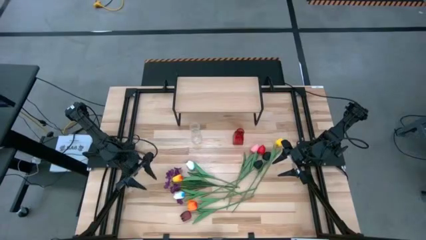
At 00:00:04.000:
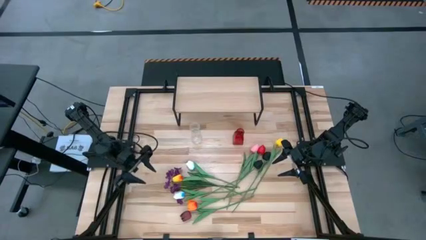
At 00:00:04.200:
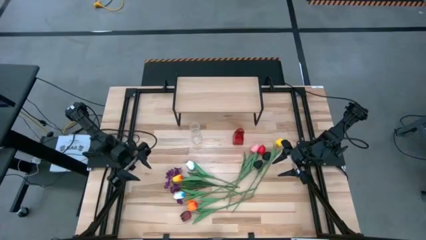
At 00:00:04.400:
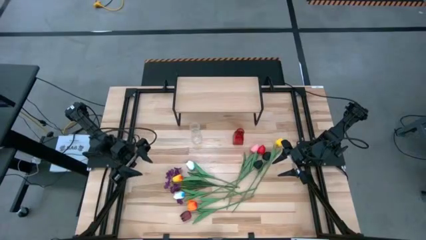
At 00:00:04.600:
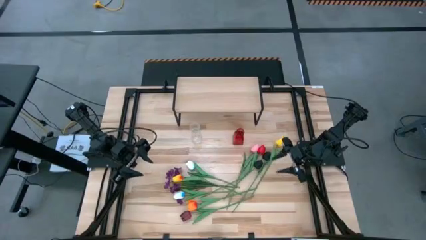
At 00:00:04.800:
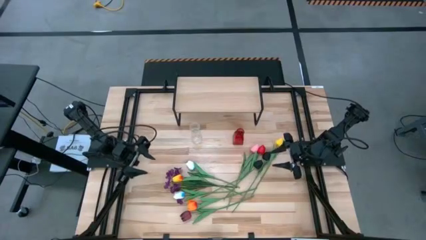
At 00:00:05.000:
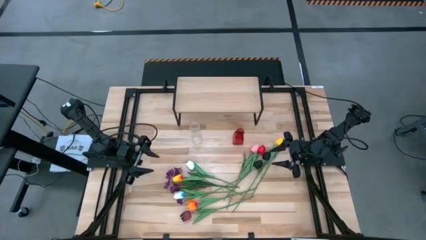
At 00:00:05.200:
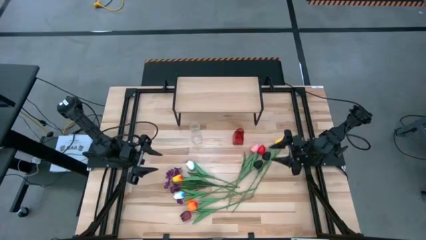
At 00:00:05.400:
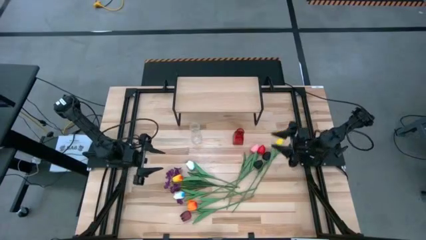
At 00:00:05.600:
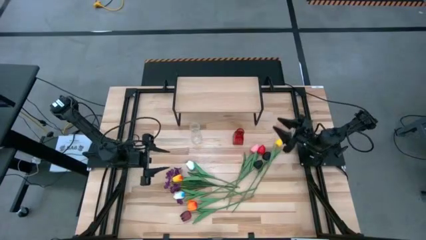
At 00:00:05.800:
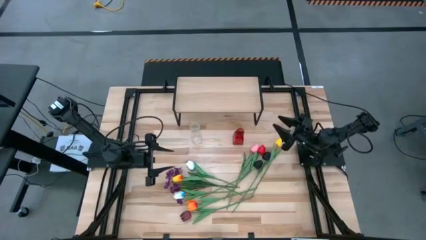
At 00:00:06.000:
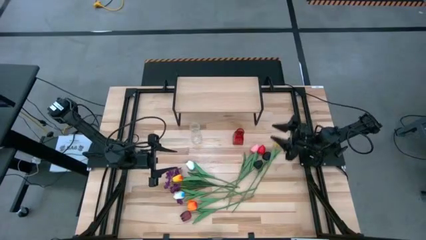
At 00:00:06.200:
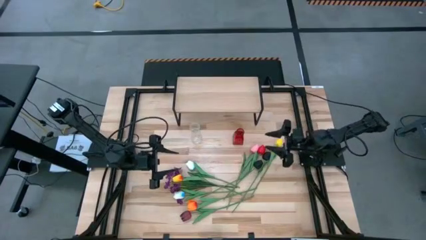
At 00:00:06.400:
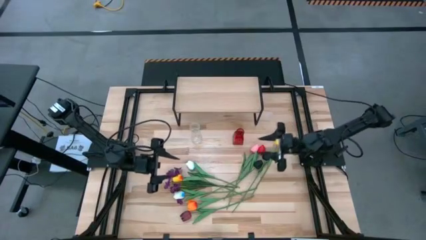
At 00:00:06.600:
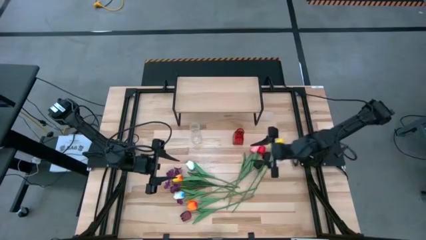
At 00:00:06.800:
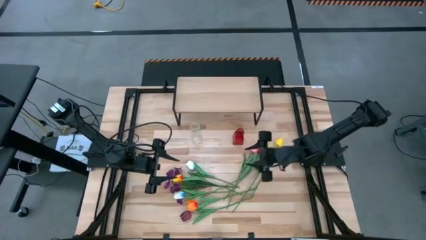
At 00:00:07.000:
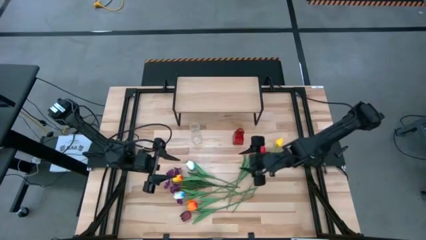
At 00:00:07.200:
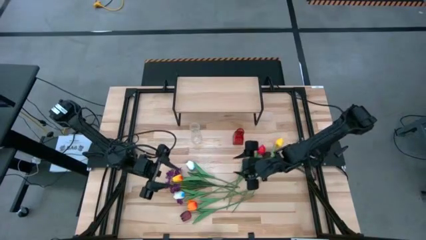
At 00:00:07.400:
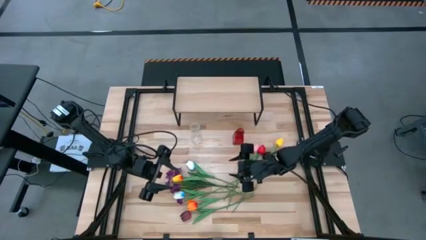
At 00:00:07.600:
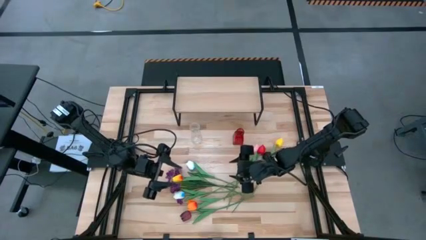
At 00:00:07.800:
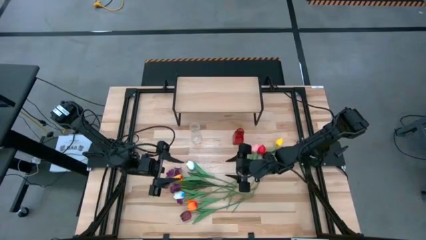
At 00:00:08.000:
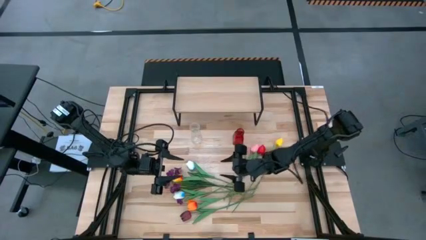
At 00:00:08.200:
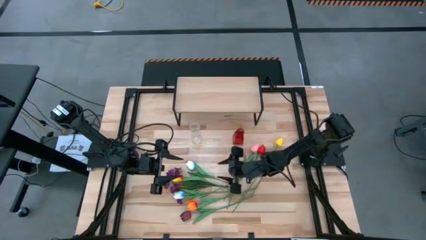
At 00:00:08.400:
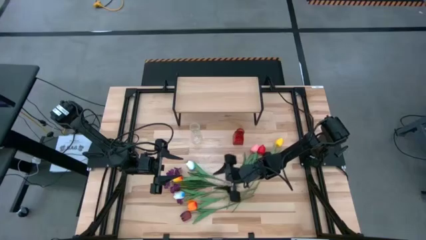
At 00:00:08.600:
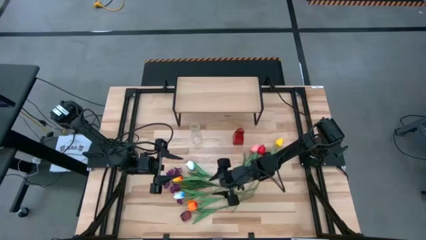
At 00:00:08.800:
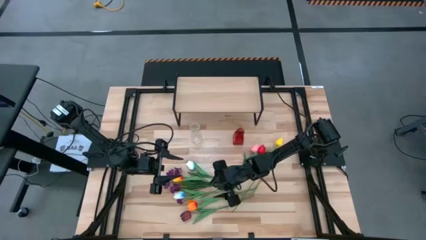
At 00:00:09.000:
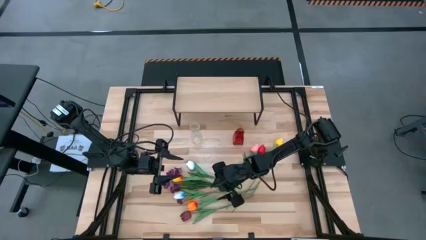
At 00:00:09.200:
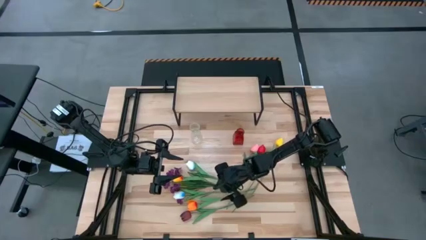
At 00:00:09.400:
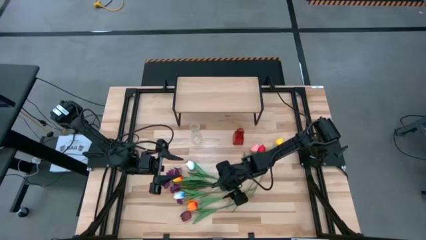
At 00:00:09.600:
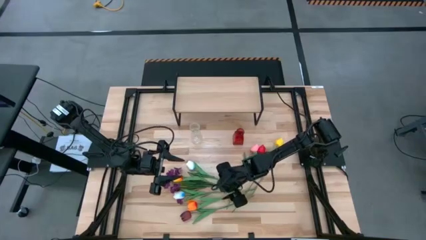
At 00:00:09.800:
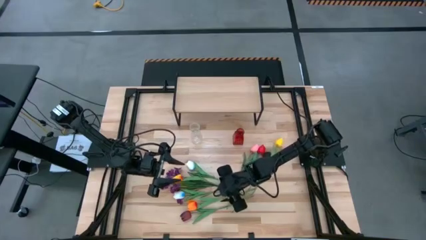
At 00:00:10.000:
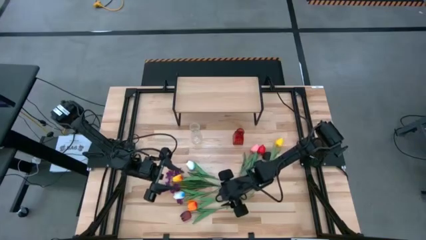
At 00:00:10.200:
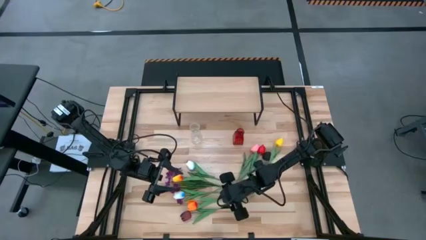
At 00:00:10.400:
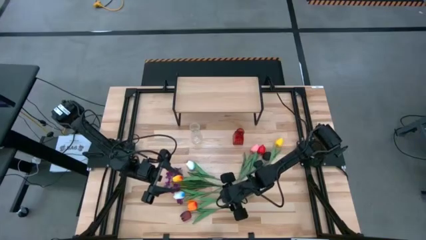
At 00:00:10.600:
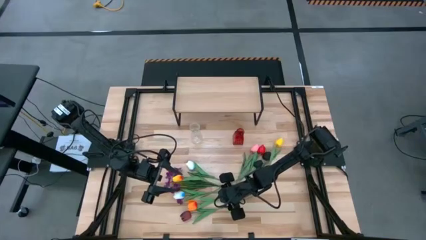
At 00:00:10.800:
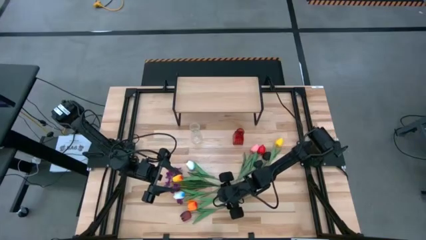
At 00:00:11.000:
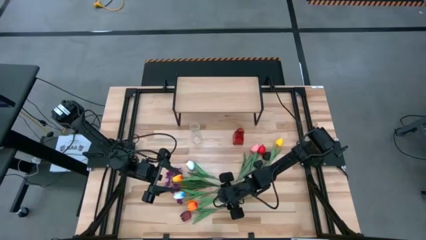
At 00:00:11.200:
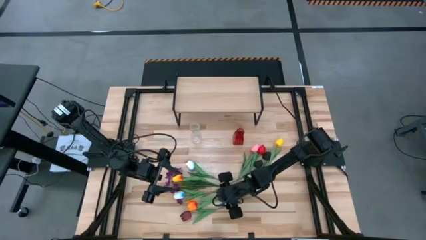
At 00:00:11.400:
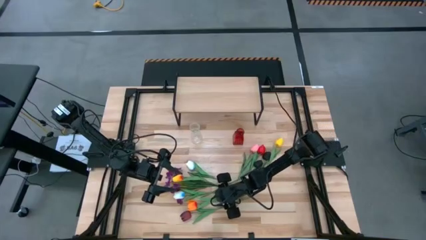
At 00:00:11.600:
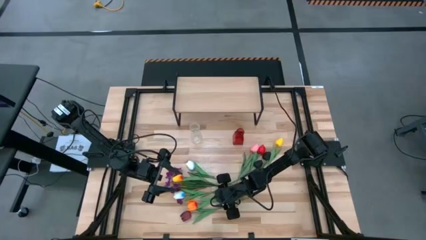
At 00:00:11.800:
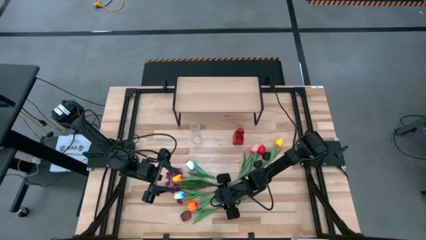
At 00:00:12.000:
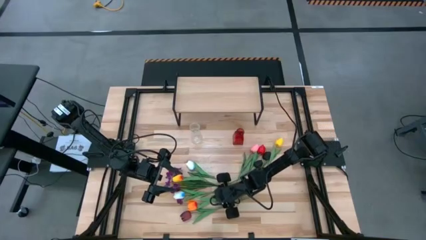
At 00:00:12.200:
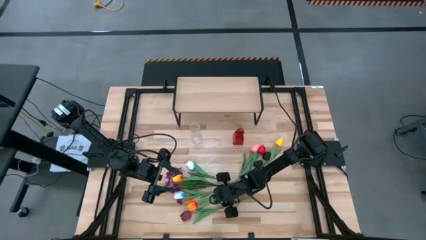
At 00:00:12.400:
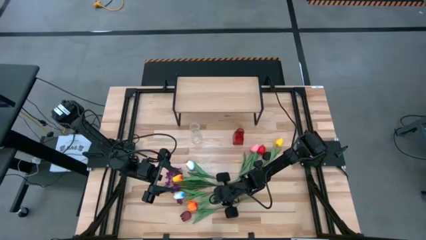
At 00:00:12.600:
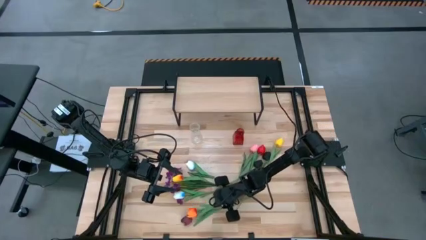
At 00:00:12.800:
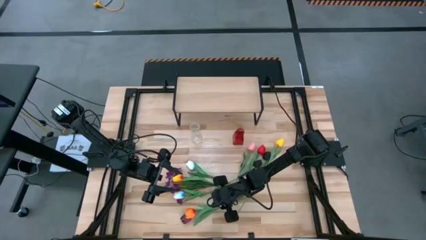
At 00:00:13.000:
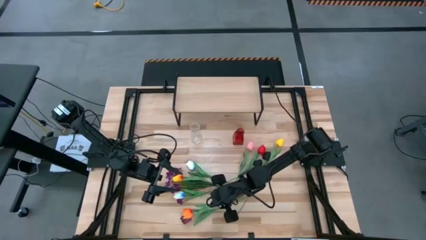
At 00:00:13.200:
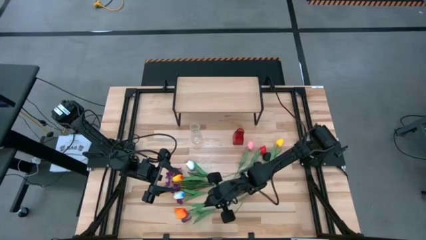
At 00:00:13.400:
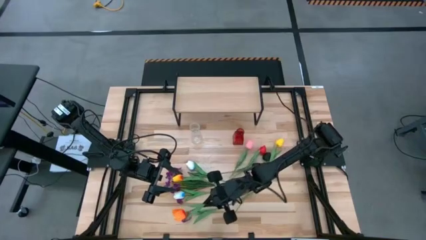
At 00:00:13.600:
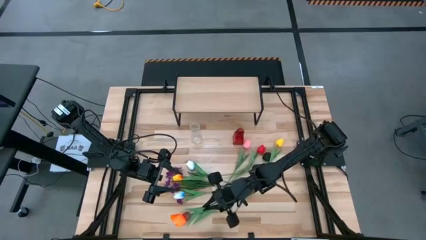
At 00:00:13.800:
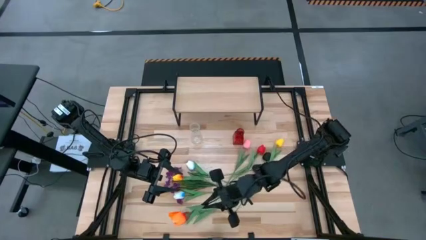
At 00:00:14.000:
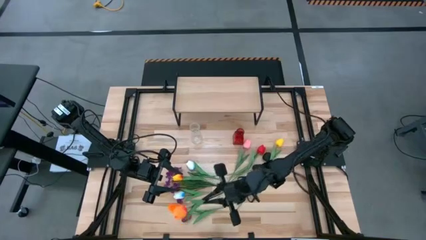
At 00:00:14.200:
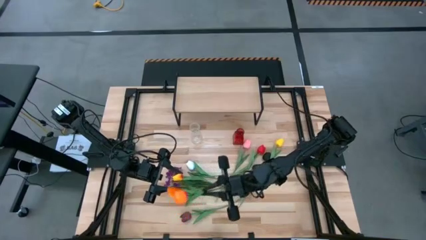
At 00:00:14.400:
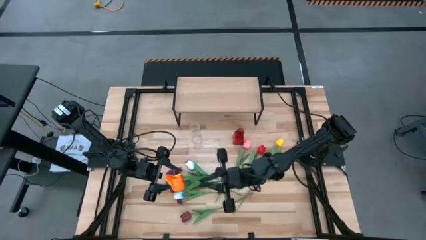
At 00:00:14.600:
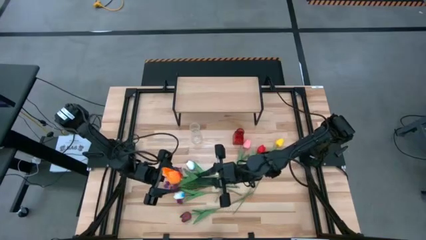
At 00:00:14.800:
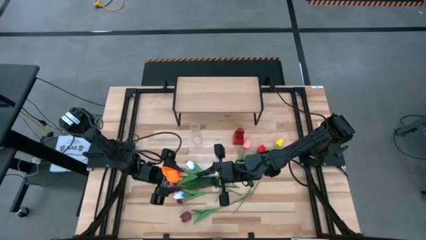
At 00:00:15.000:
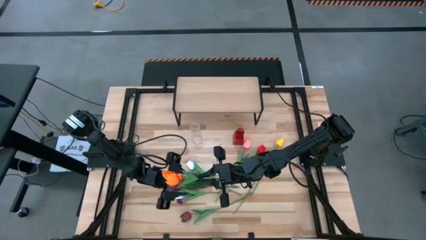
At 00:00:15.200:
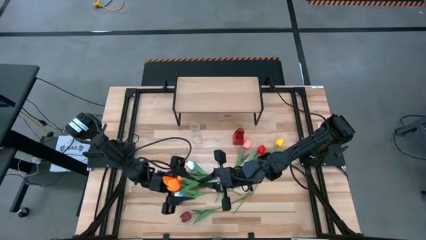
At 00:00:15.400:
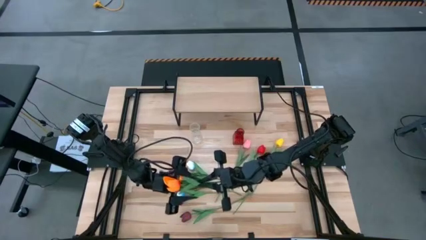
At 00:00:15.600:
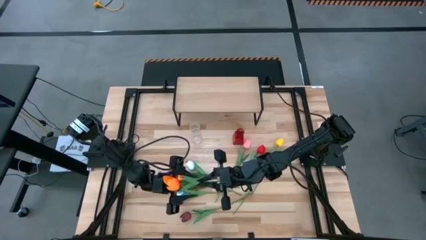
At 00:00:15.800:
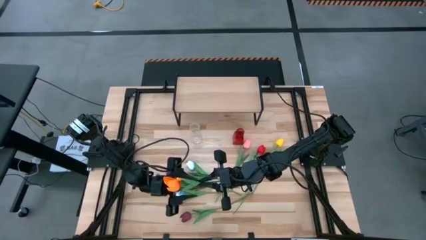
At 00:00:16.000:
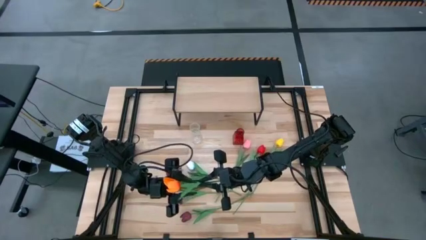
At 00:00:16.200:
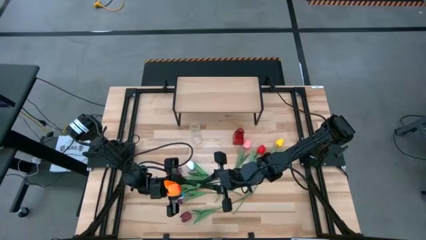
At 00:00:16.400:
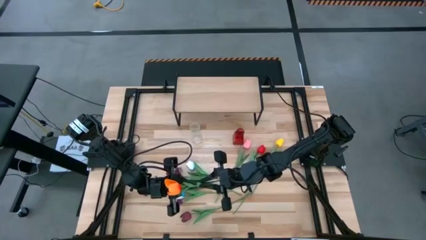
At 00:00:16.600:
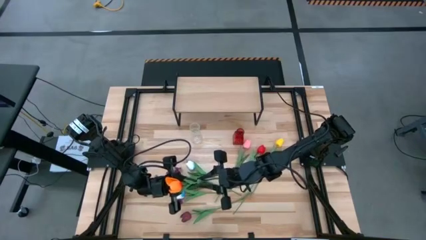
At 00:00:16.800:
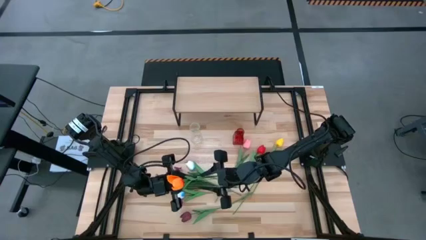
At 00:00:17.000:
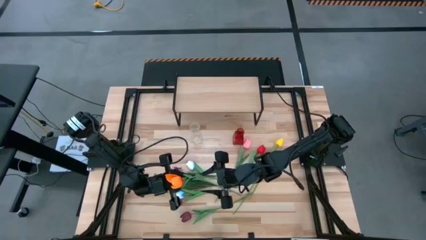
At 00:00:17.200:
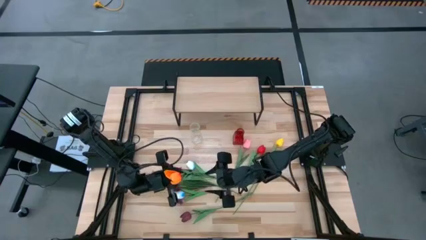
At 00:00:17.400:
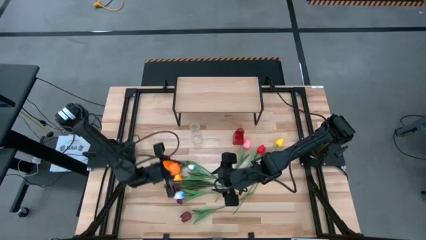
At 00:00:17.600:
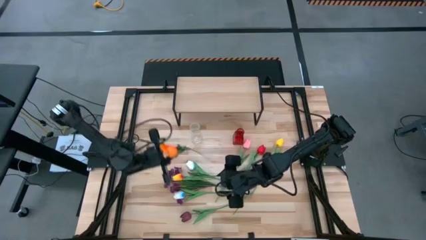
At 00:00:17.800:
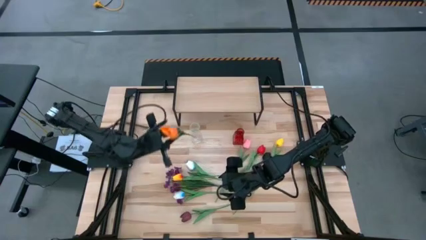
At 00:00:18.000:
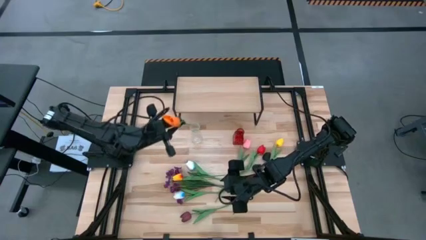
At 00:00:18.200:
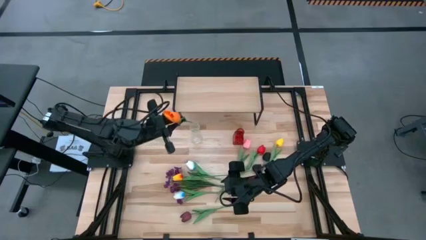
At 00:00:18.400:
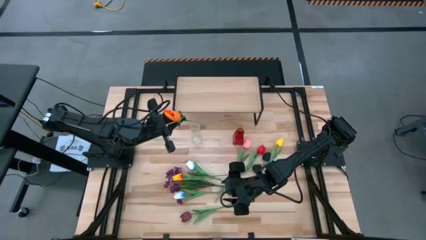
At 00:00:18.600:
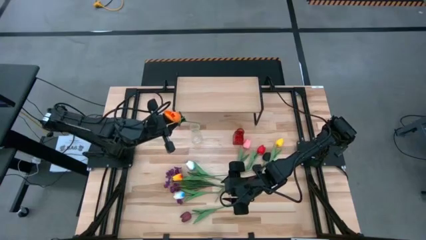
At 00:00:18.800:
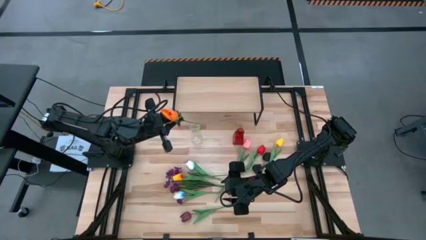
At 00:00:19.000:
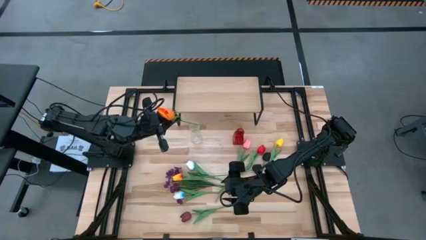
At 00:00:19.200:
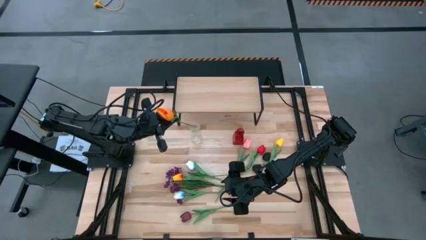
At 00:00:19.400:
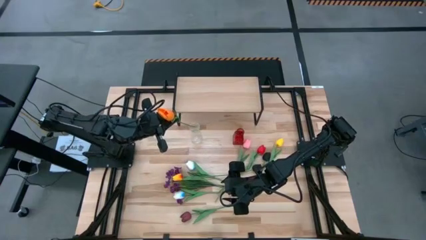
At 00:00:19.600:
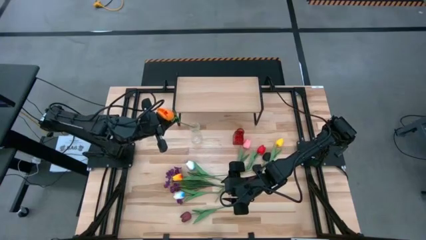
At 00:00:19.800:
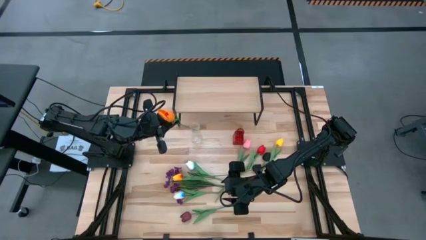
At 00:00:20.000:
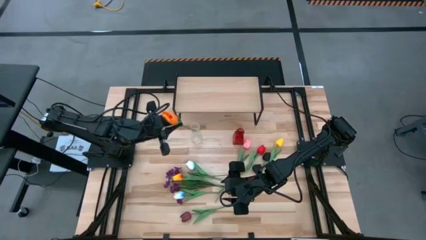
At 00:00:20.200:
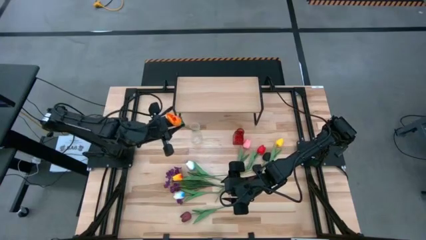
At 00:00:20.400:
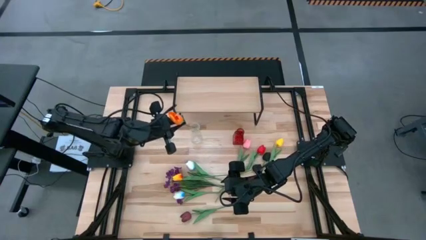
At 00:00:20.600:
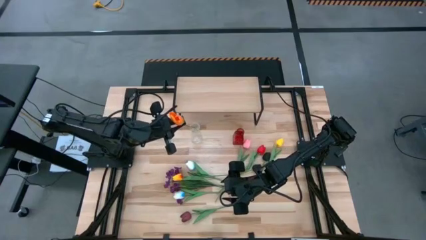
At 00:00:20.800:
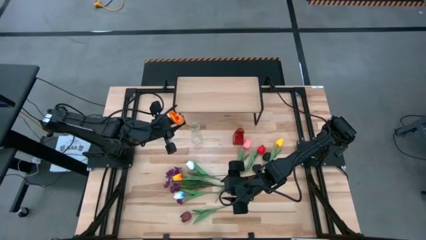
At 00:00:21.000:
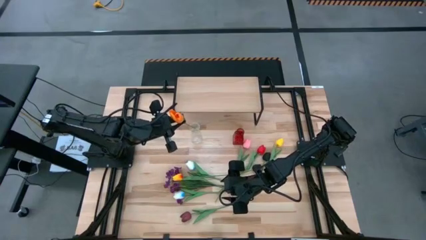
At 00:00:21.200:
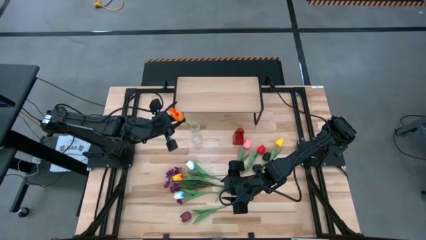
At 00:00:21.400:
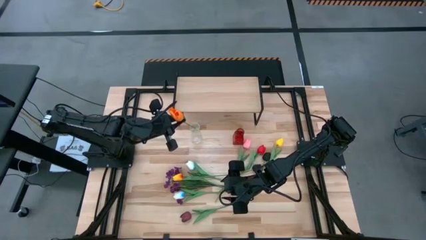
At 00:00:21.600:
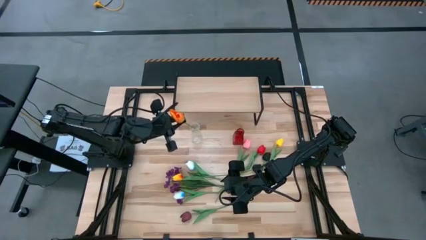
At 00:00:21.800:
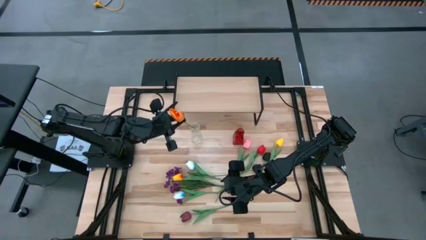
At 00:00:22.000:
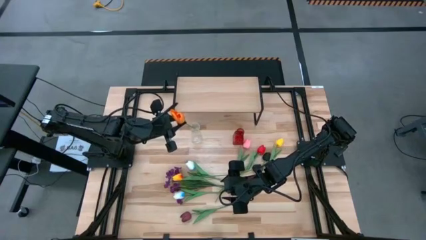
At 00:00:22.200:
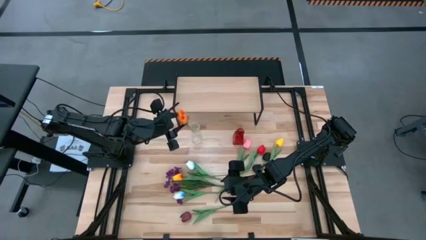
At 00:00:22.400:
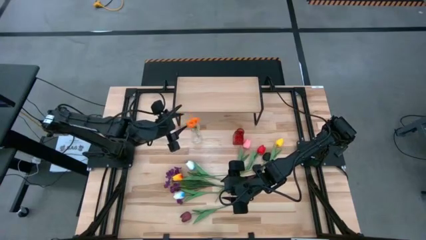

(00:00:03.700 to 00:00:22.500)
Task: Pick and place flowers into a vace then onto a shelf
Put the orange tulip into the transparent vase
